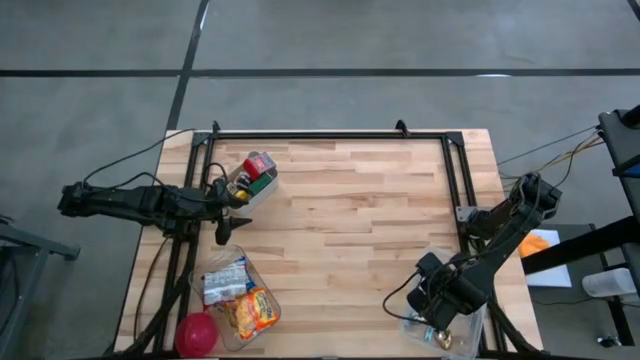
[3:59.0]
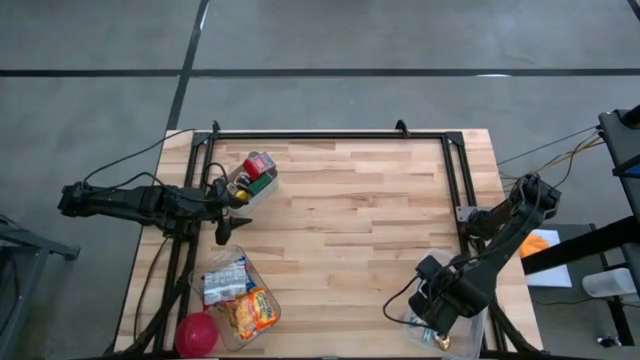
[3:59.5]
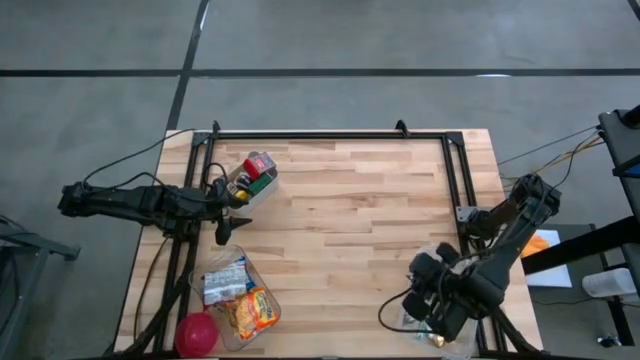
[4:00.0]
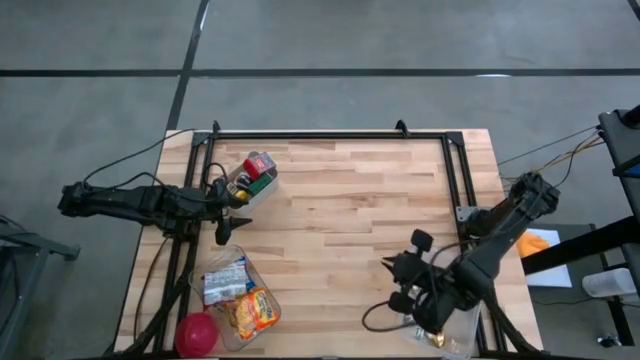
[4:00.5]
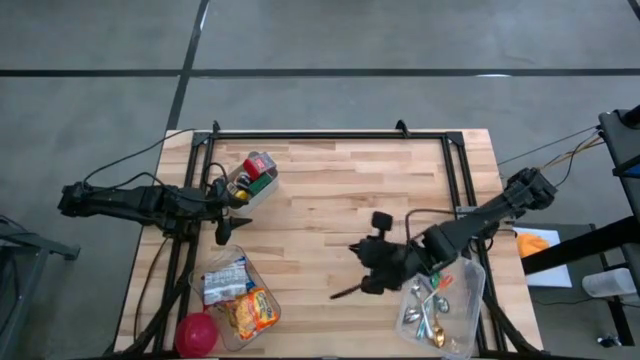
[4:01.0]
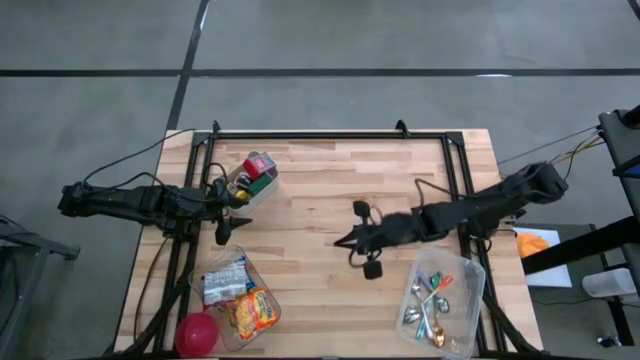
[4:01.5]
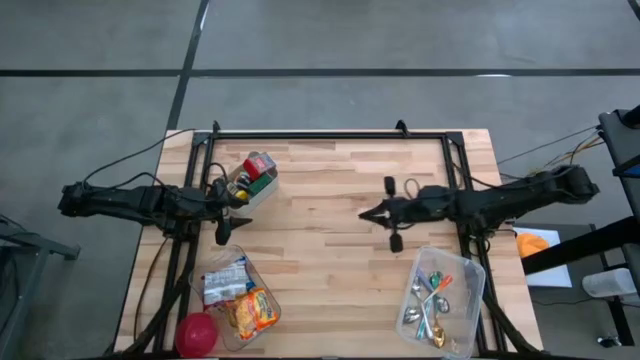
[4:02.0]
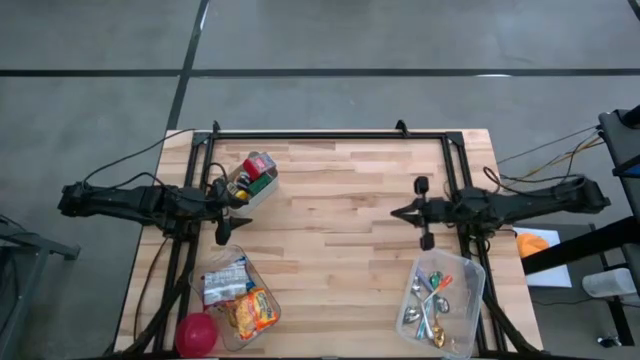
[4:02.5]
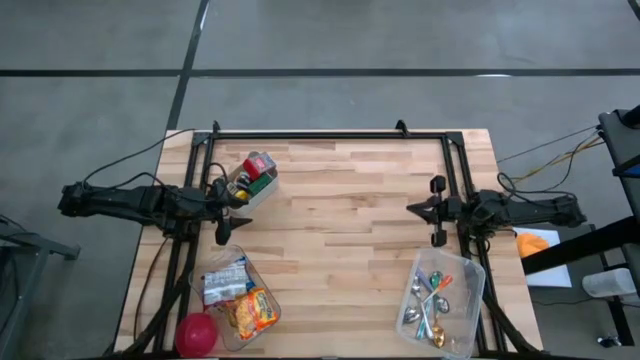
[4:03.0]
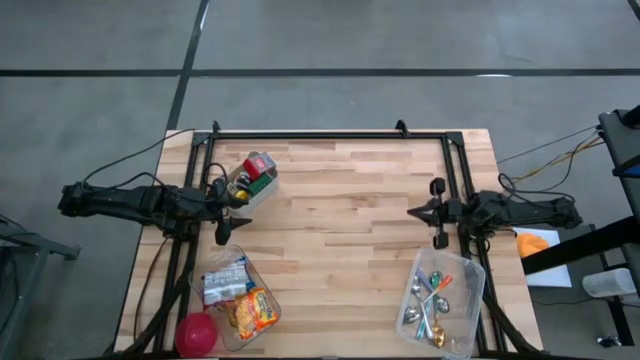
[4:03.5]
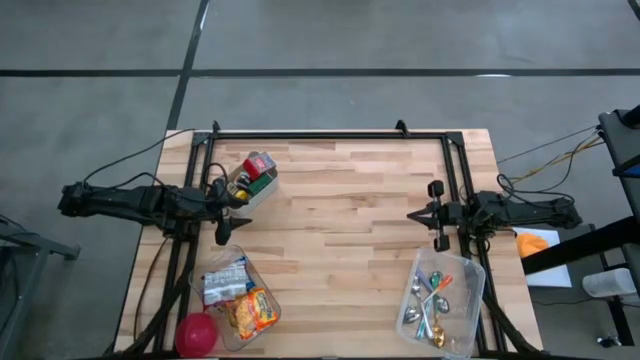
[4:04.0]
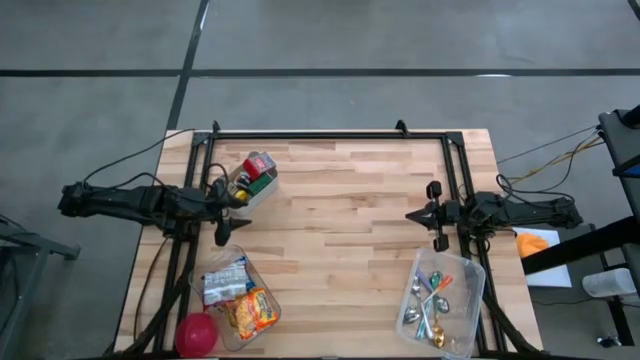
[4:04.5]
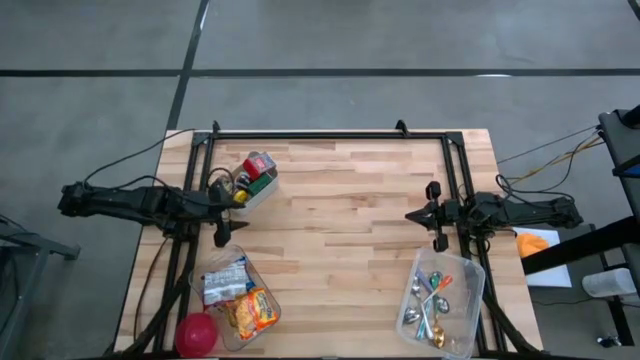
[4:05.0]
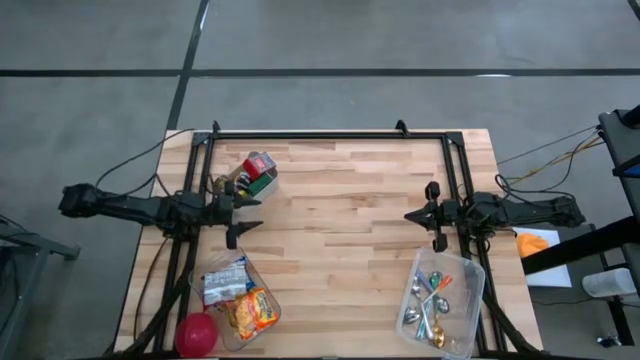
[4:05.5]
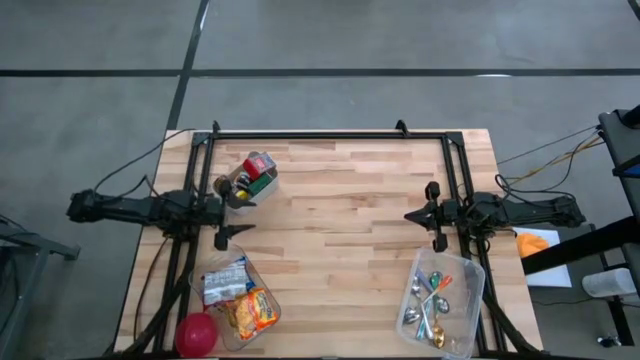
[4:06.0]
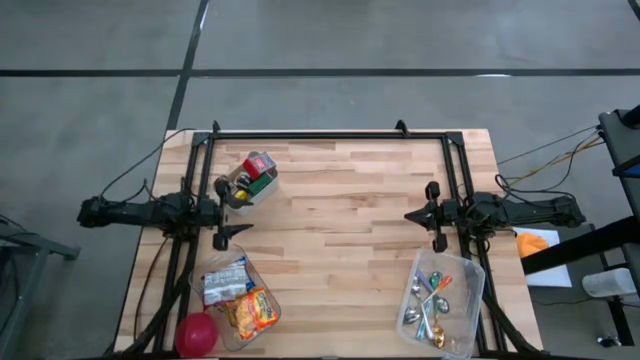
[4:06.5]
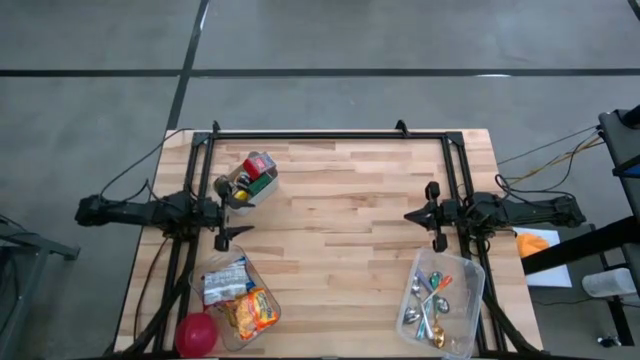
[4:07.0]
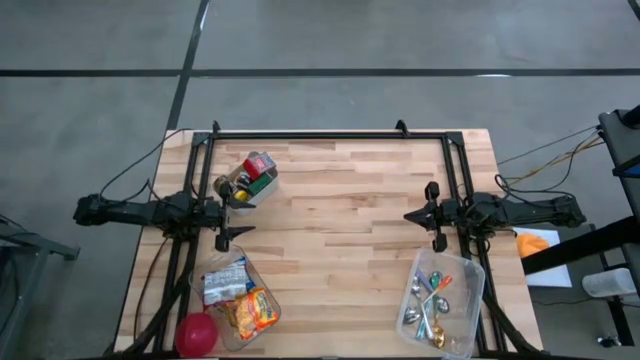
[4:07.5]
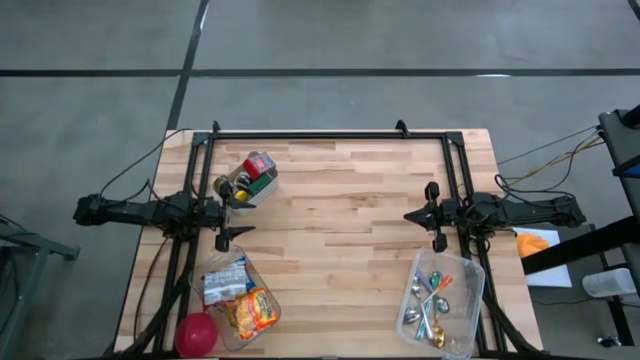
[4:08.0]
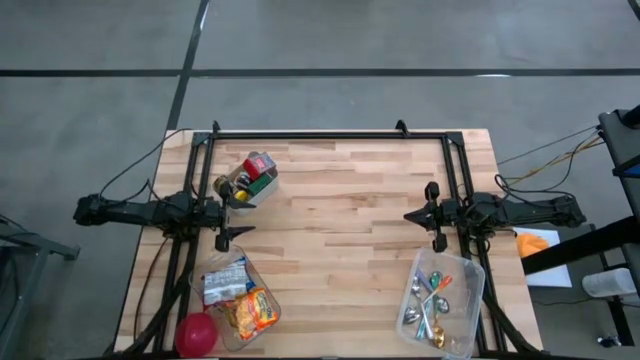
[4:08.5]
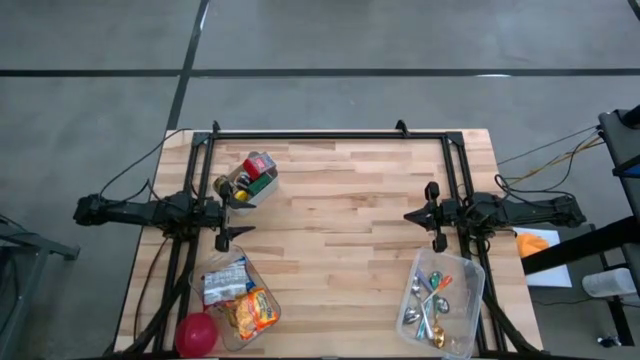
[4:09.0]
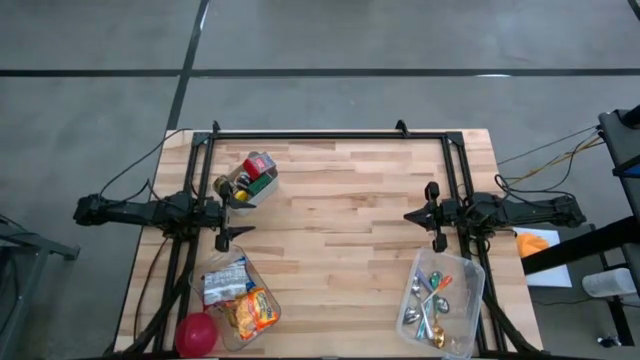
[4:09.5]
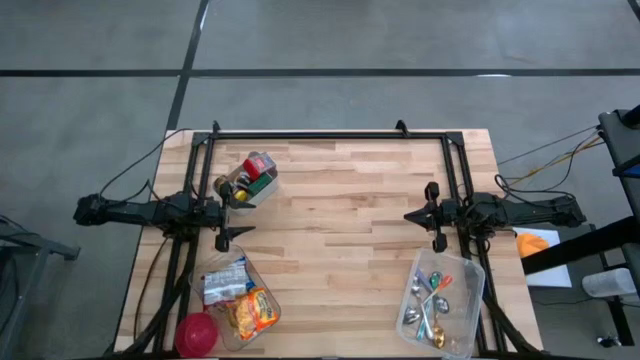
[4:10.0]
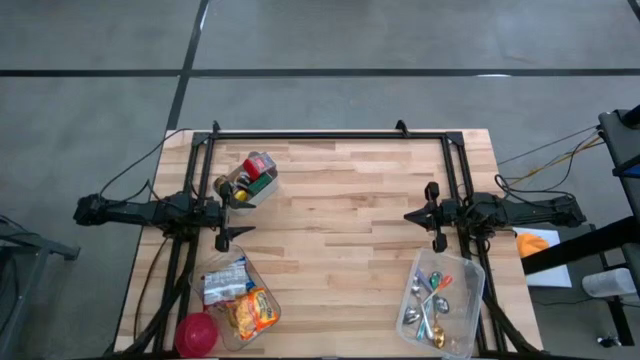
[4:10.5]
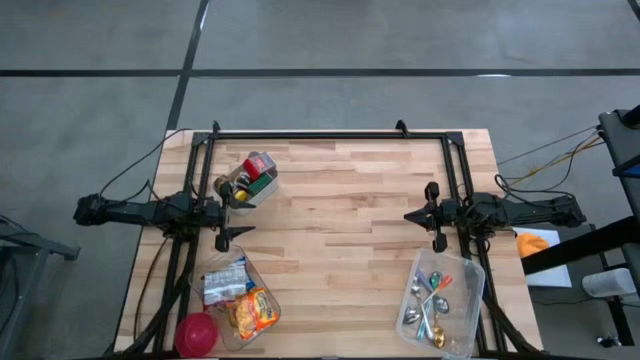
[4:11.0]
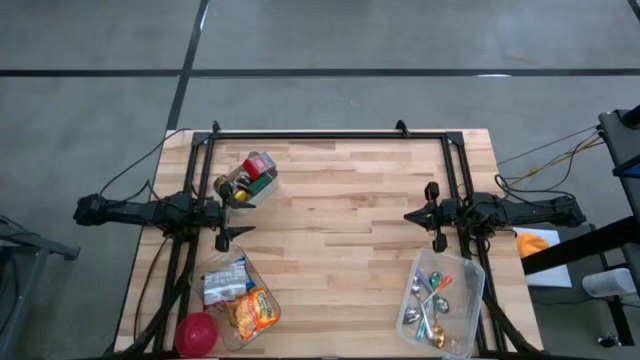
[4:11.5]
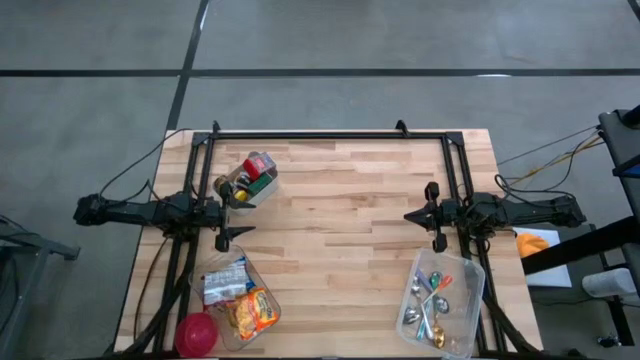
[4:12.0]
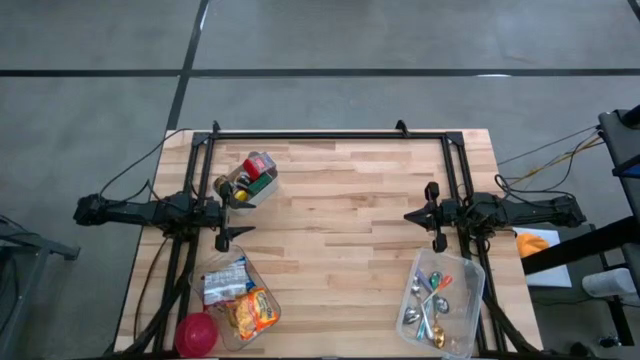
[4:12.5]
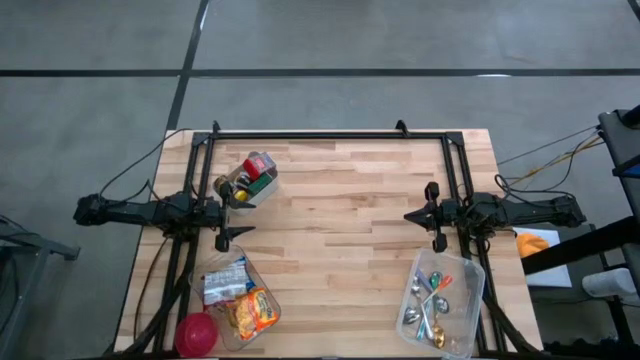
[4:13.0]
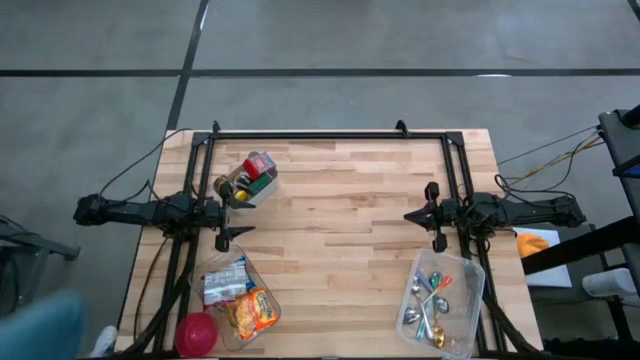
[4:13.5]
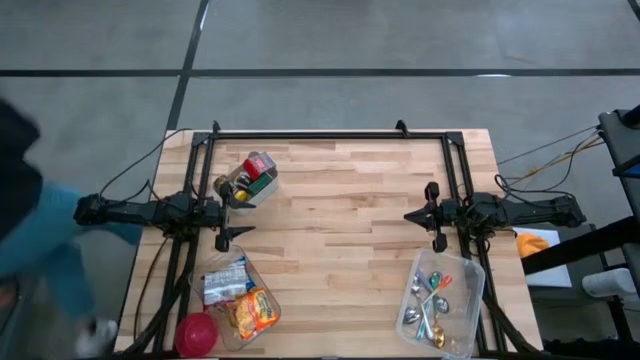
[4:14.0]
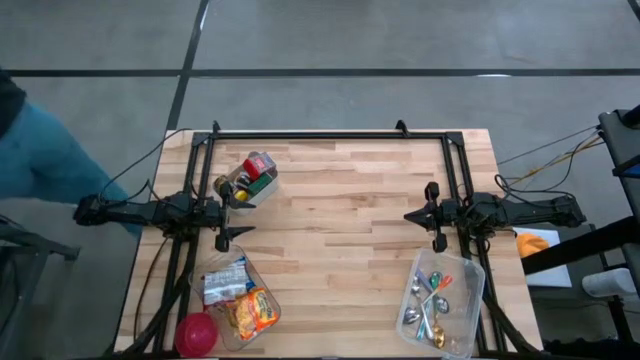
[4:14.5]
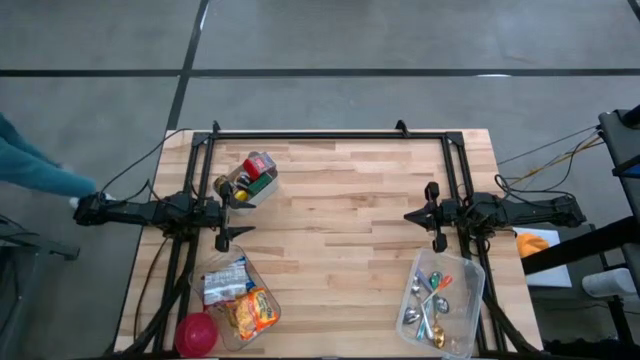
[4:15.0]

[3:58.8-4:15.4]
Return to Home Position
